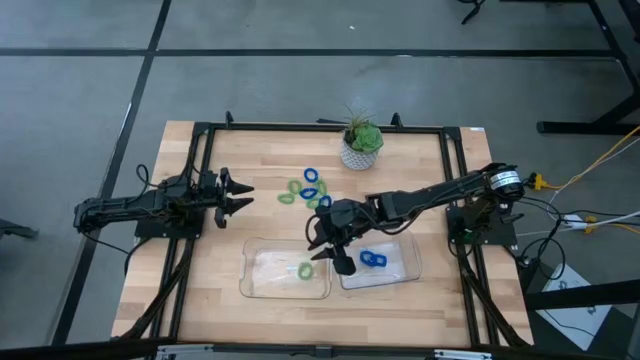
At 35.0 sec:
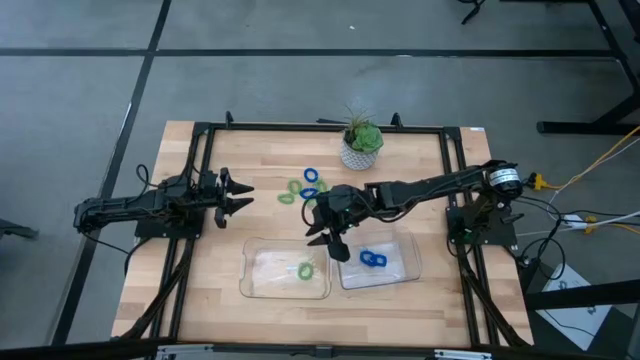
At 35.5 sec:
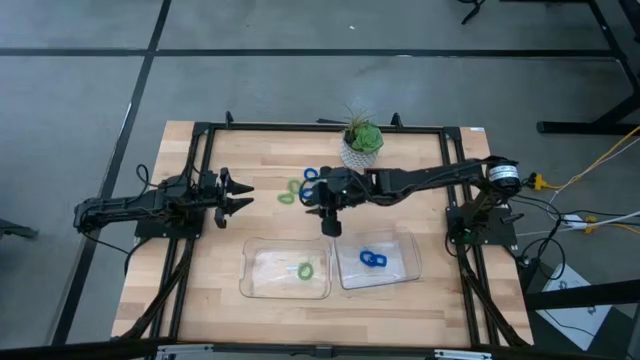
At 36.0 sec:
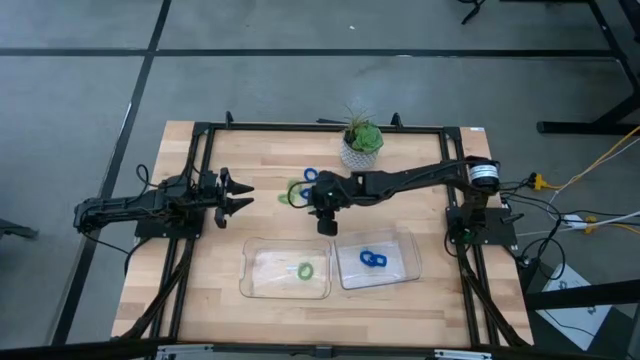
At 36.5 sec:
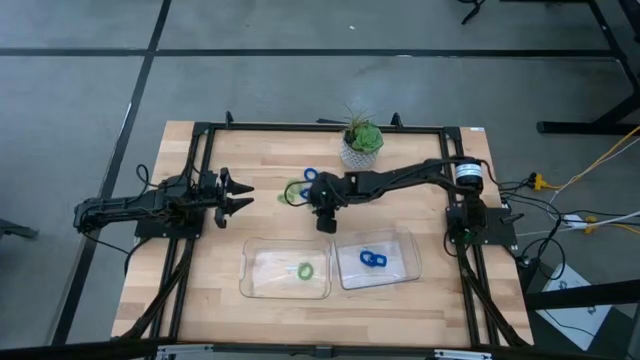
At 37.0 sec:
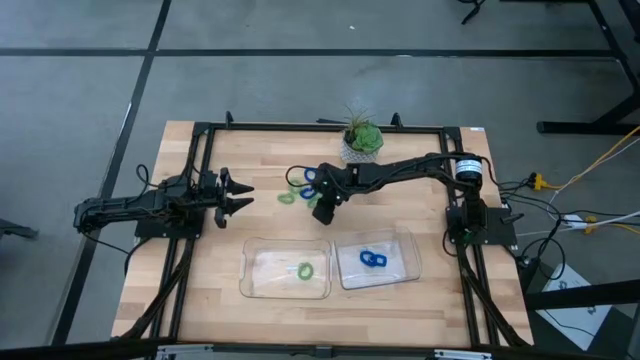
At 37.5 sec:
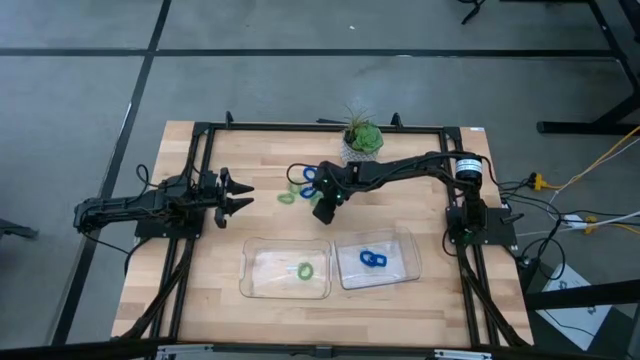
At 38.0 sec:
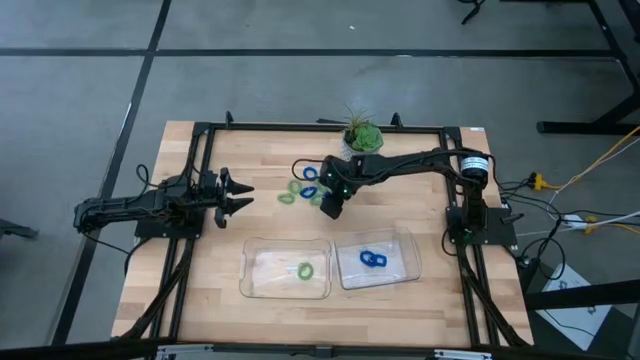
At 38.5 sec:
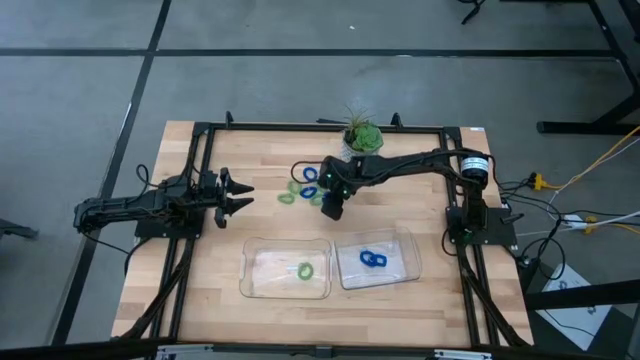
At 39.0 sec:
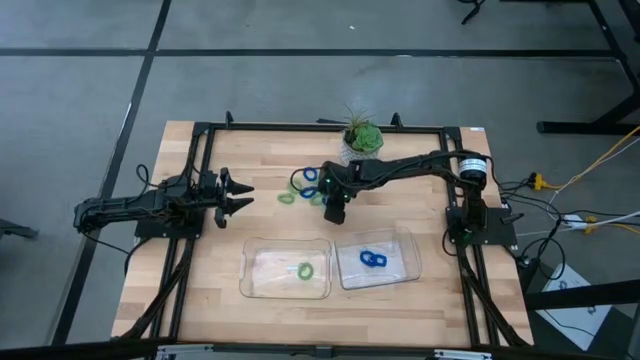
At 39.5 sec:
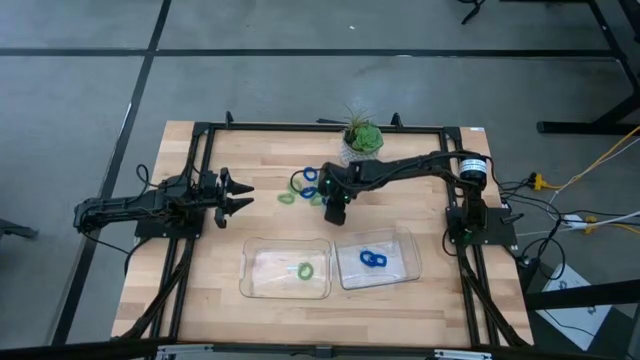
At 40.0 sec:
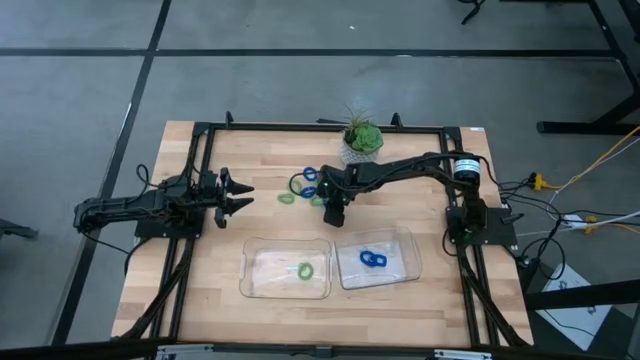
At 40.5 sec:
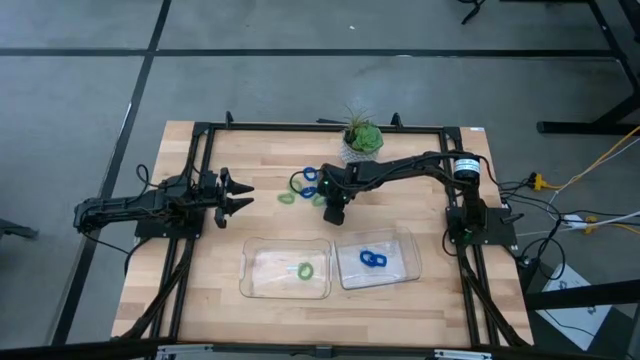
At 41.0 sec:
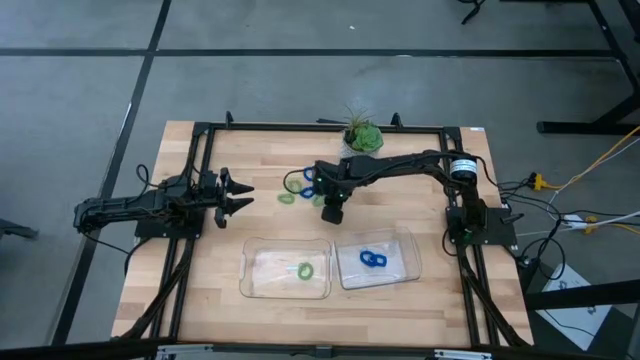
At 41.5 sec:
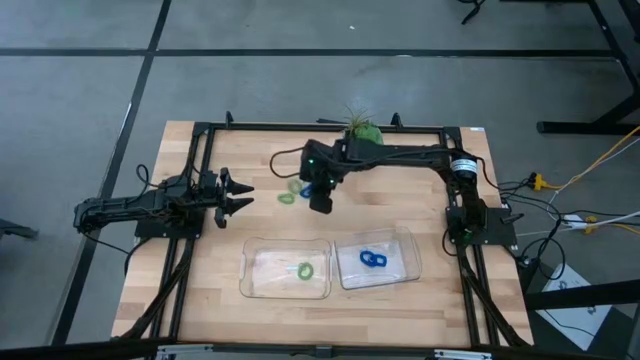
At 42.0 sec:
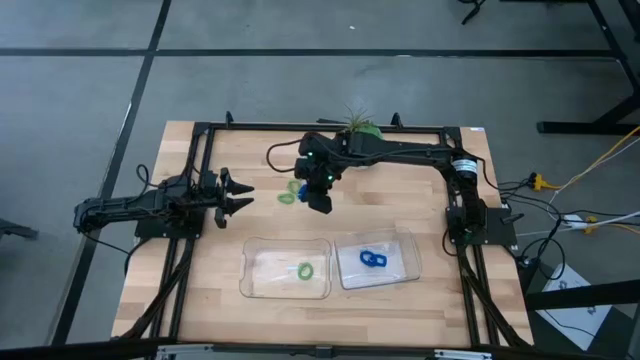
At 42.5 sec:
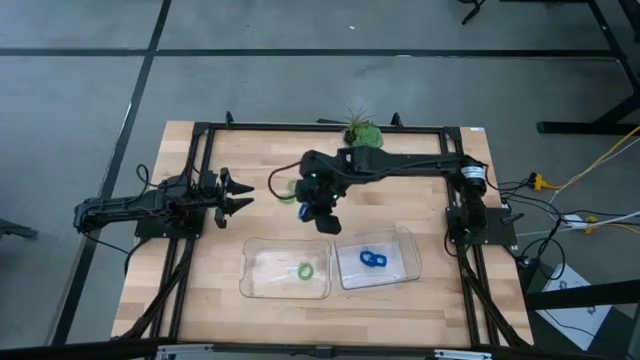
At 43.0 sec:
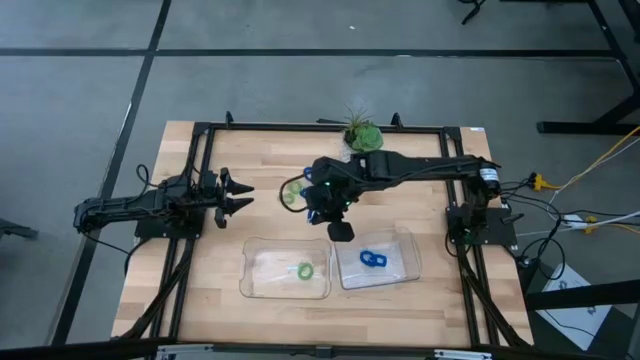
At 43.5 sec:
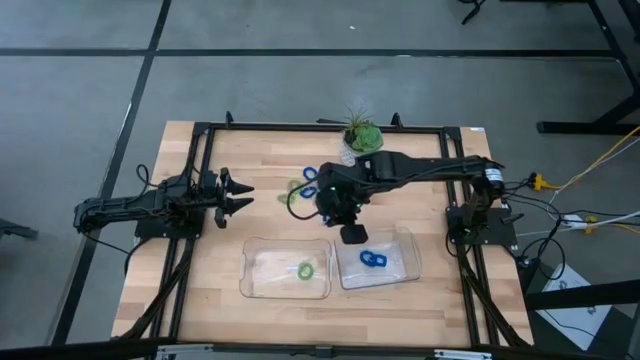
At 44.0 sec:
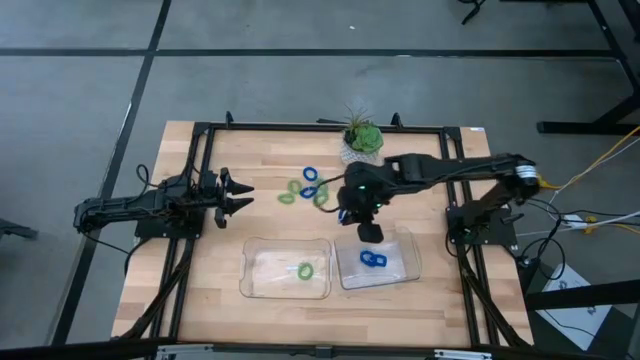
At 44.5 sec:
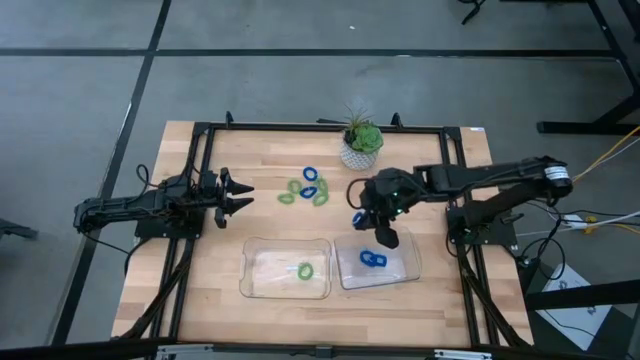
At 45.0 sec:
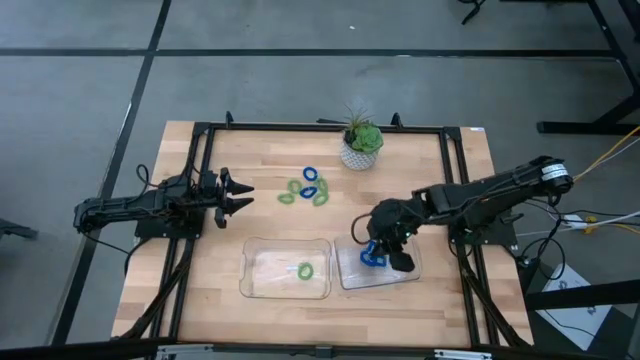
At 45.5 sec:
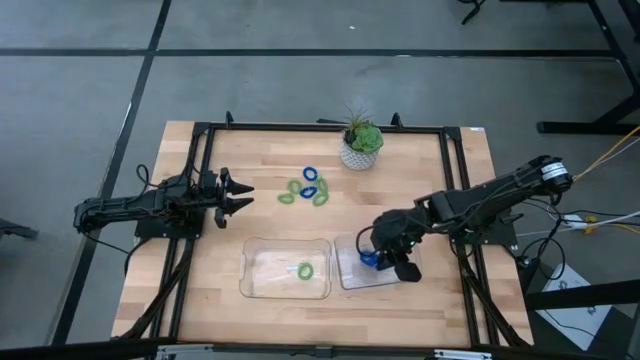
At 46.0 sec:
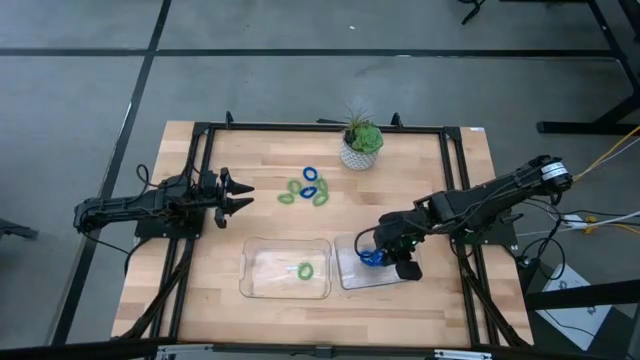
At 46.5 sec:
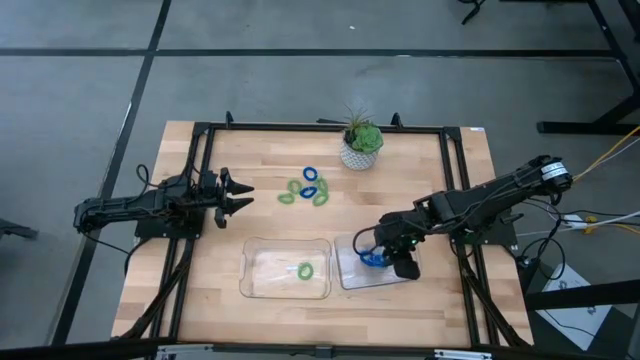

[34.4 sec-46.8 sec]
Task: Sort spring keychains
Put the blue spring keychain into the right transparent bin

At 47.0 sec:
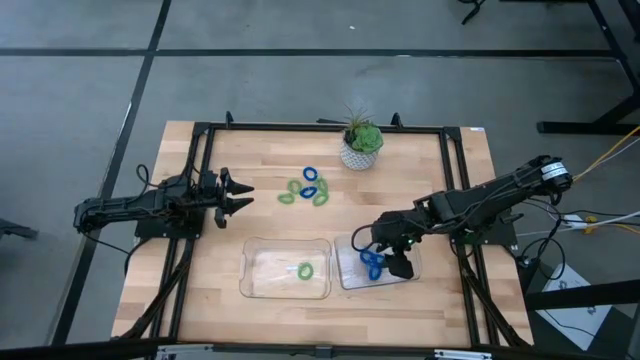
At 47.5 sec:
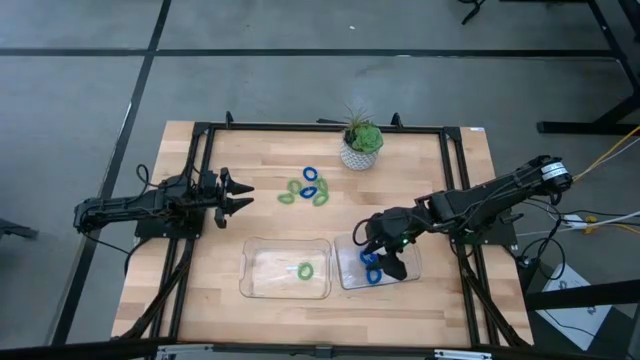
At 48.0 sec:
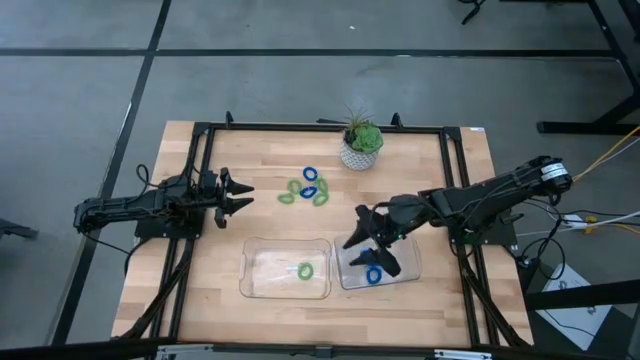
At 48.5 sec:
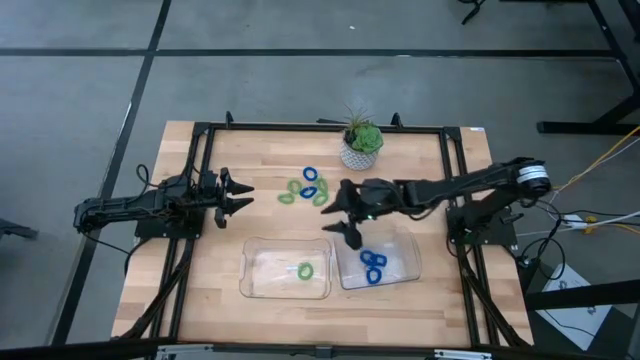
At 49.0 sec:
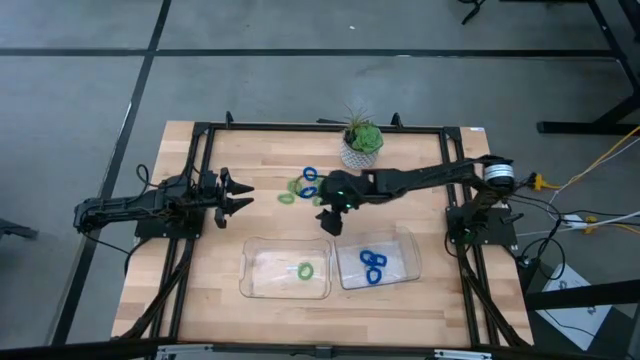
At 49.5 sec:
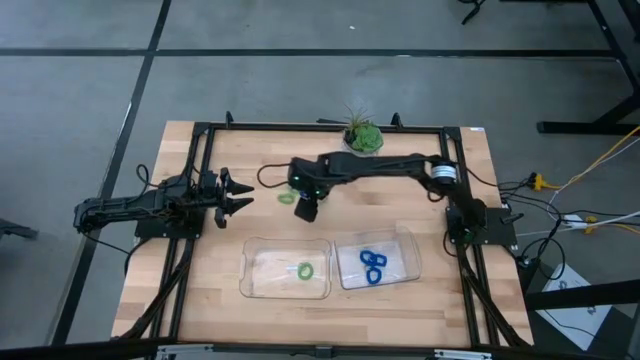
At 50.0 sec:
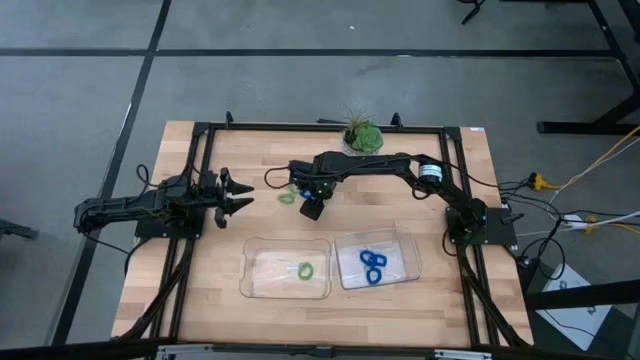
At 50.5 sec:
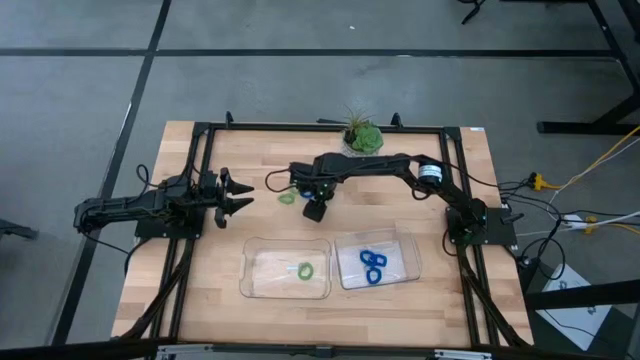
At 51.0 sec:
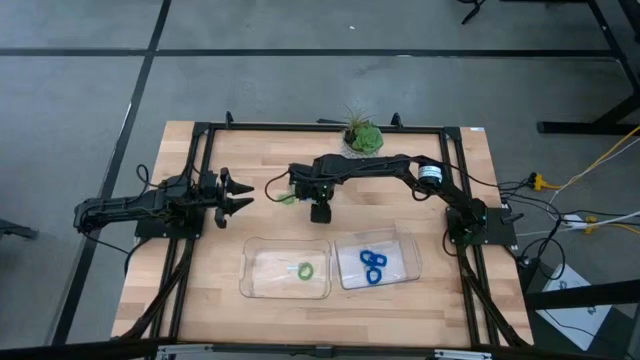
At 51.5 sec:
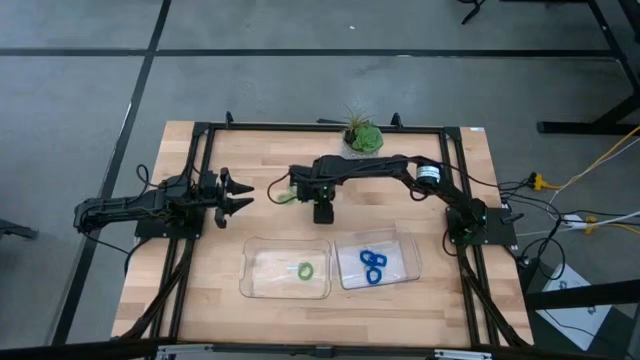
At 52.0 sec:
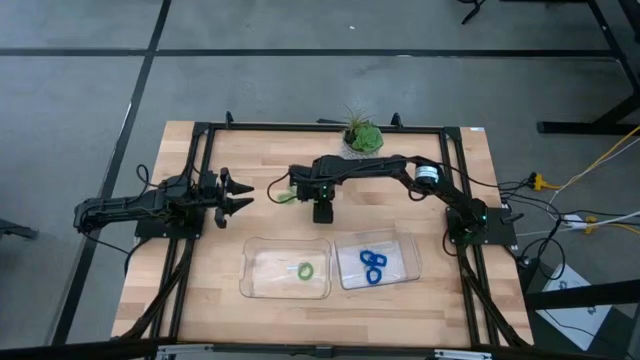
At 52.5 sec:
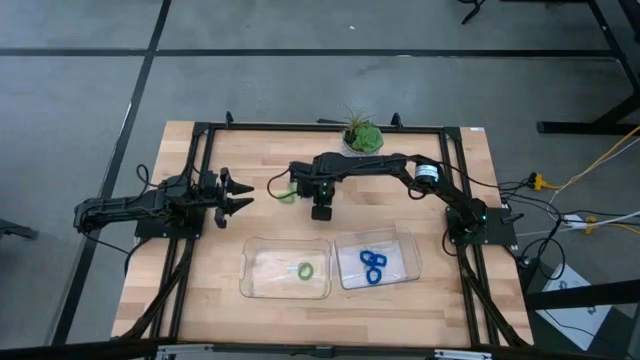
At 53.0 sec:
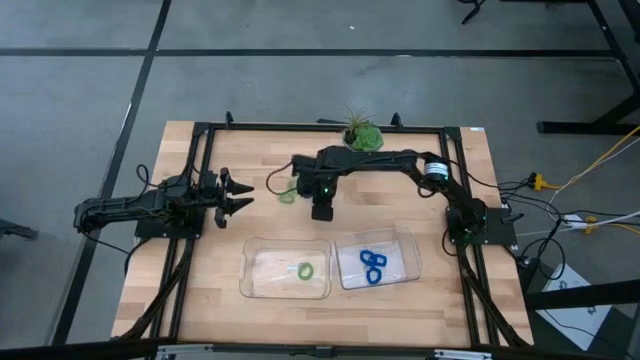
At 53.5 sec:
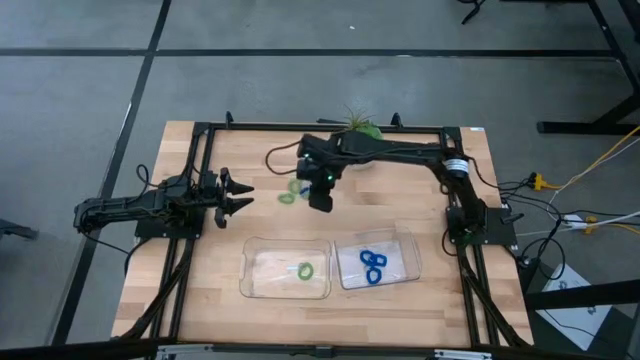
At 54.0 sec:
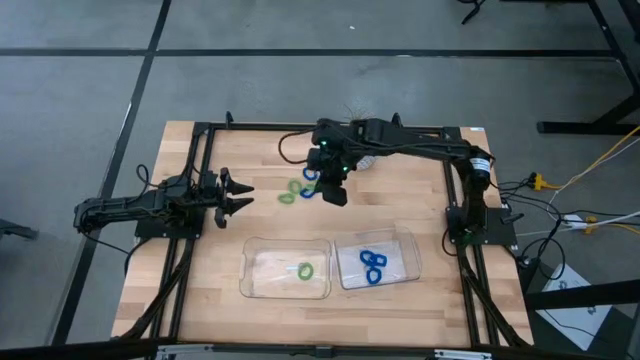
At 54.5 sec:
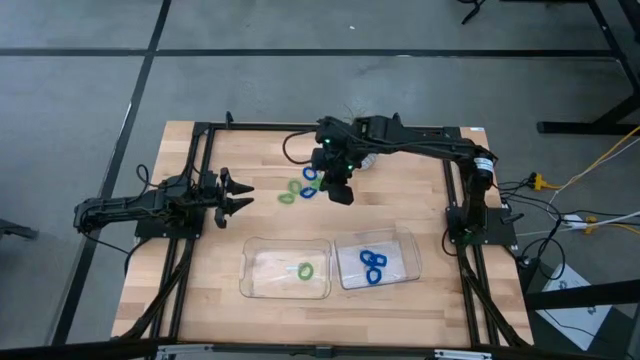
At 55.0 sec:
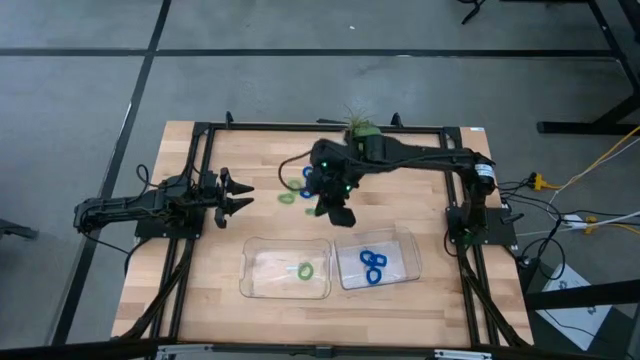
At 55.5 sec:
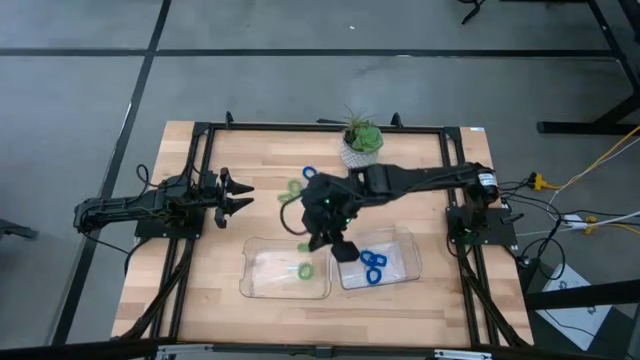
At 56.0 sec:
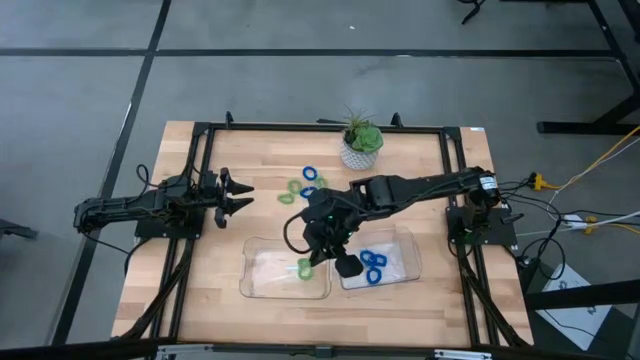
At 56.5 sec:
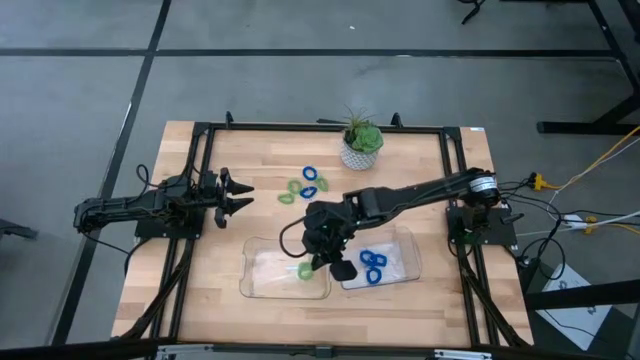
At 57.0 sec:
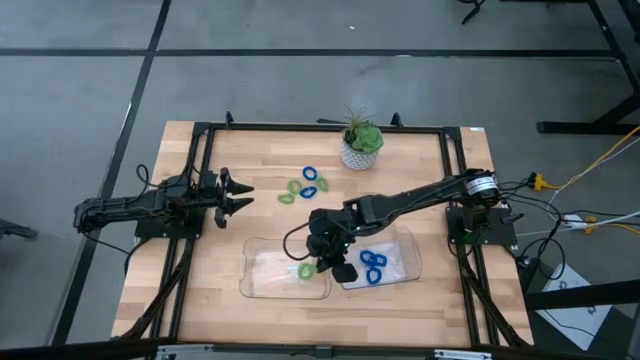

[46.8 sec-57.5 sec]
Put the green spring keychain into the left transparent bin
